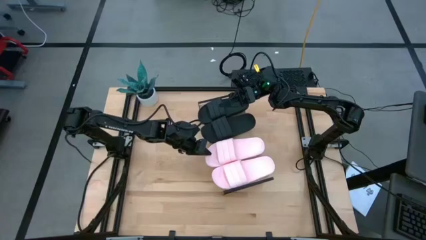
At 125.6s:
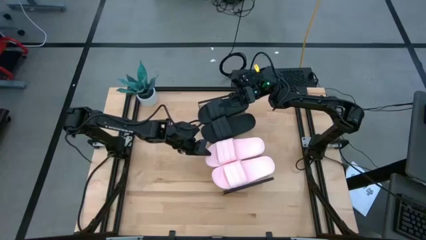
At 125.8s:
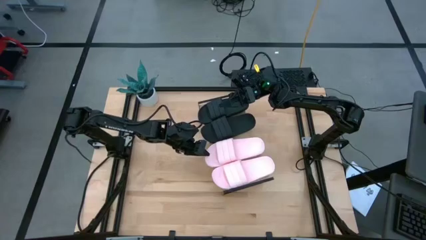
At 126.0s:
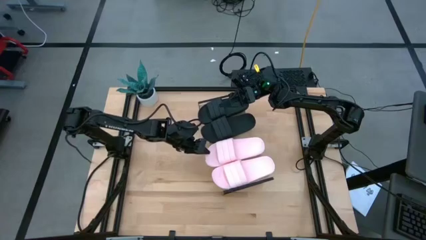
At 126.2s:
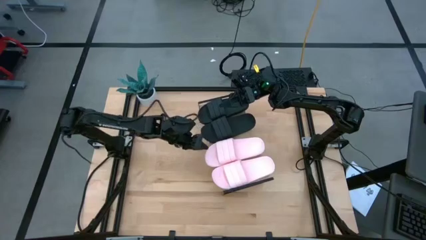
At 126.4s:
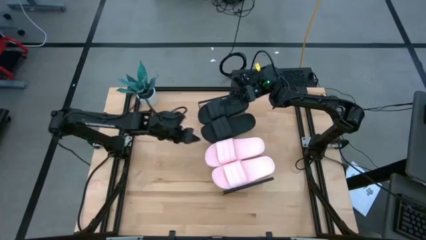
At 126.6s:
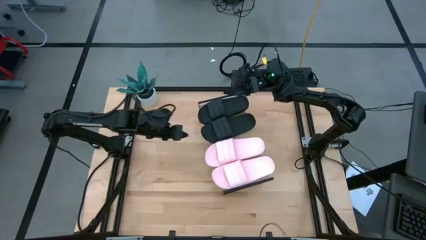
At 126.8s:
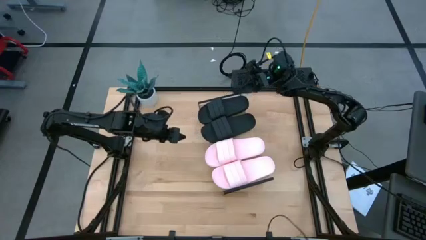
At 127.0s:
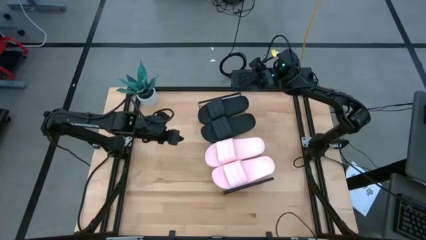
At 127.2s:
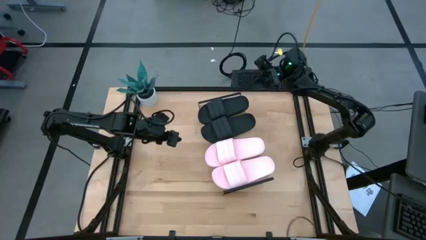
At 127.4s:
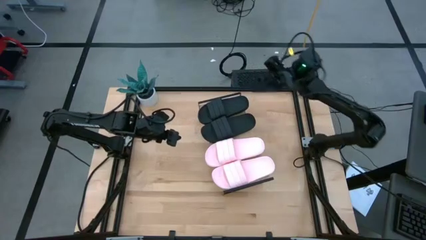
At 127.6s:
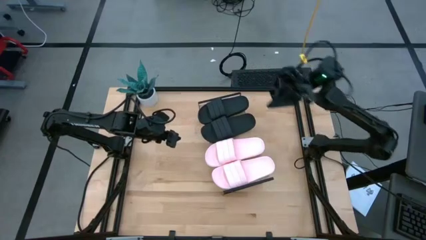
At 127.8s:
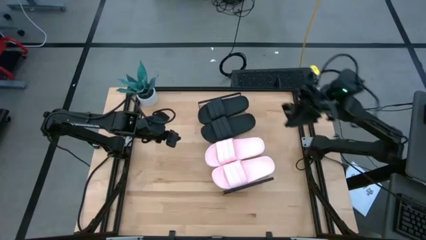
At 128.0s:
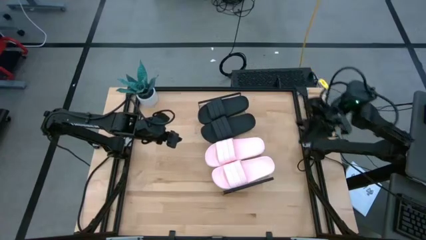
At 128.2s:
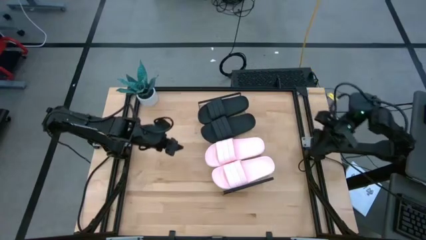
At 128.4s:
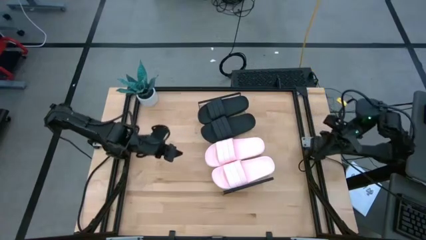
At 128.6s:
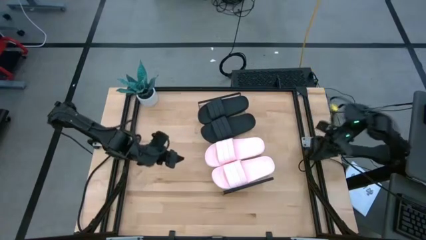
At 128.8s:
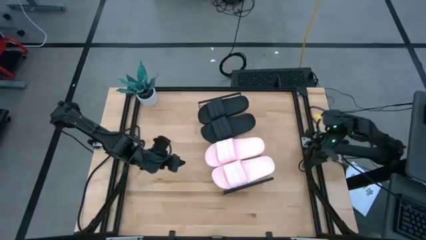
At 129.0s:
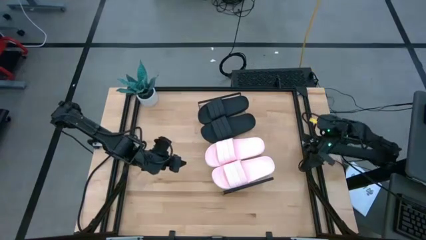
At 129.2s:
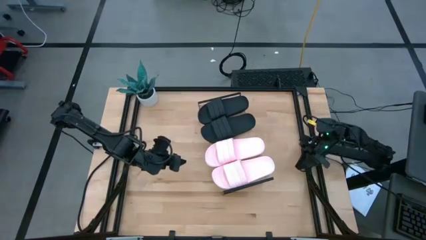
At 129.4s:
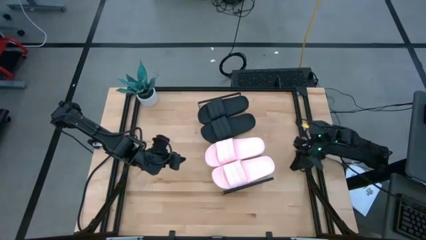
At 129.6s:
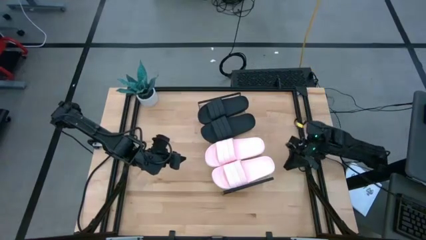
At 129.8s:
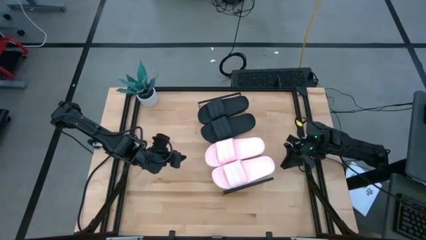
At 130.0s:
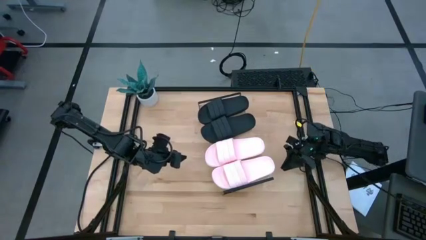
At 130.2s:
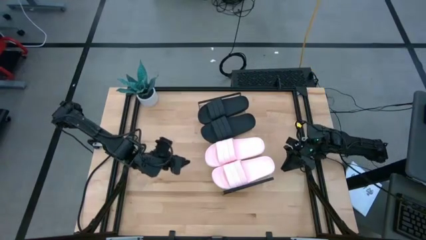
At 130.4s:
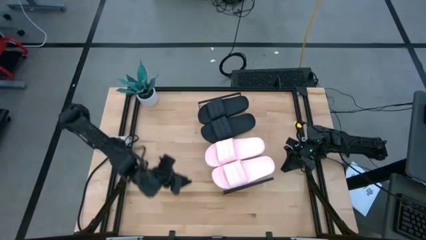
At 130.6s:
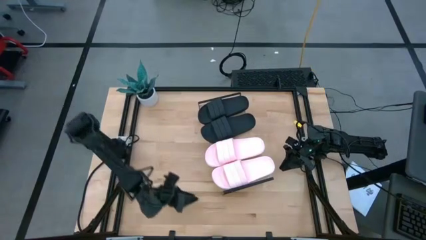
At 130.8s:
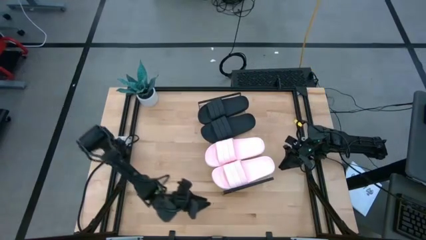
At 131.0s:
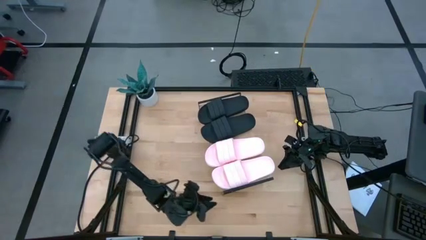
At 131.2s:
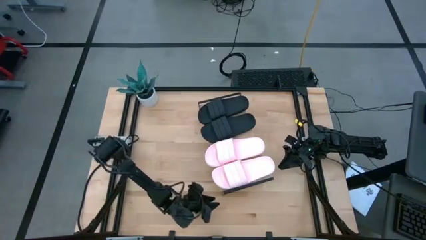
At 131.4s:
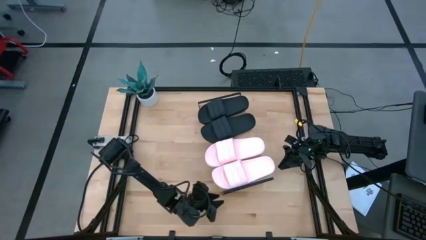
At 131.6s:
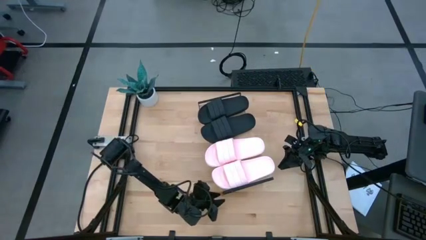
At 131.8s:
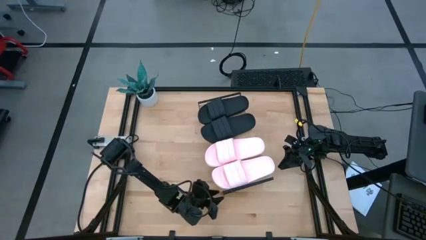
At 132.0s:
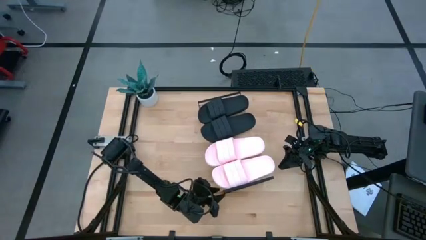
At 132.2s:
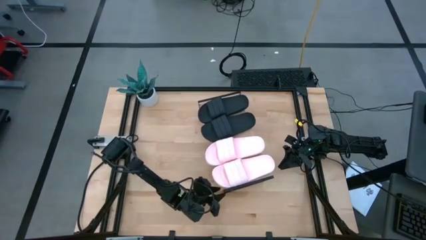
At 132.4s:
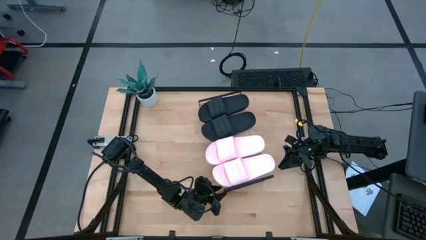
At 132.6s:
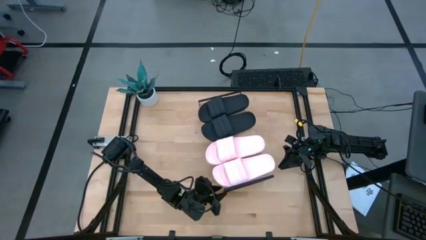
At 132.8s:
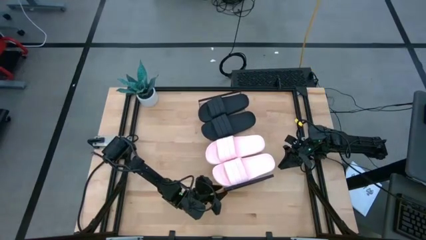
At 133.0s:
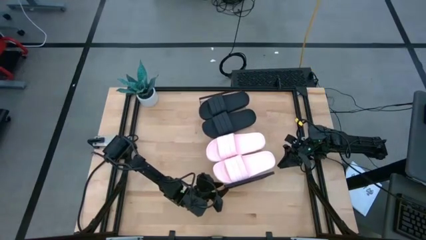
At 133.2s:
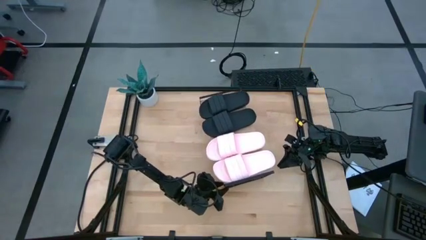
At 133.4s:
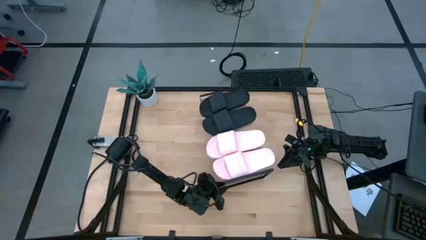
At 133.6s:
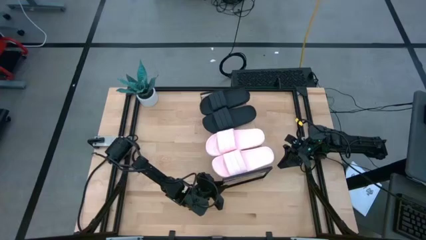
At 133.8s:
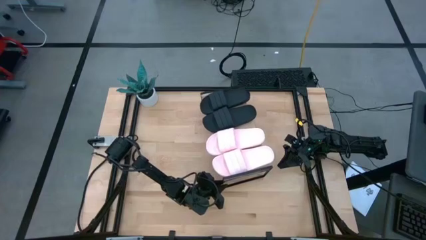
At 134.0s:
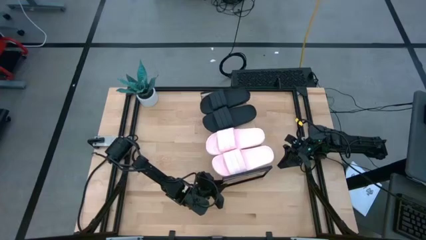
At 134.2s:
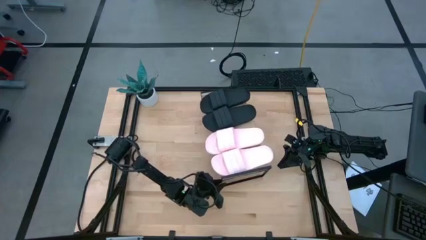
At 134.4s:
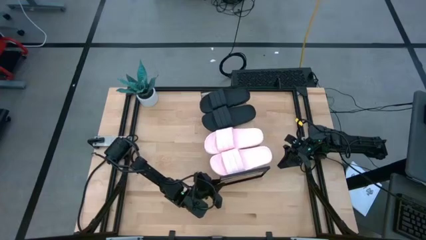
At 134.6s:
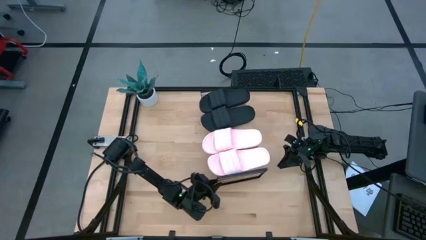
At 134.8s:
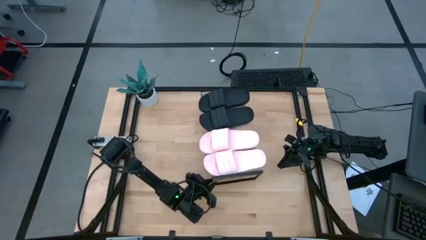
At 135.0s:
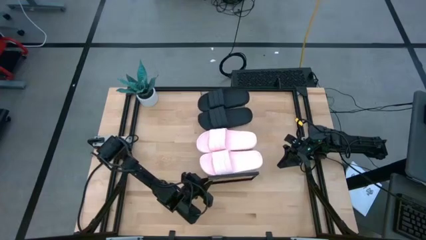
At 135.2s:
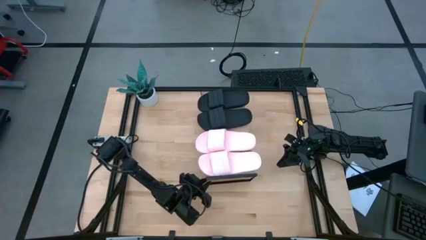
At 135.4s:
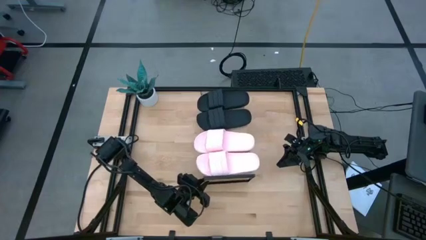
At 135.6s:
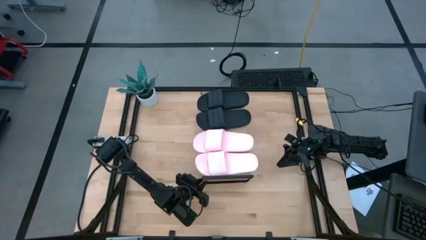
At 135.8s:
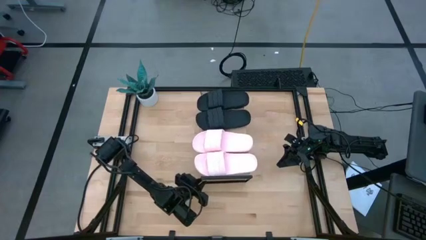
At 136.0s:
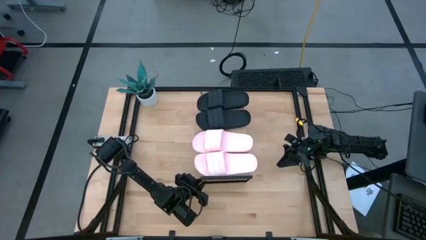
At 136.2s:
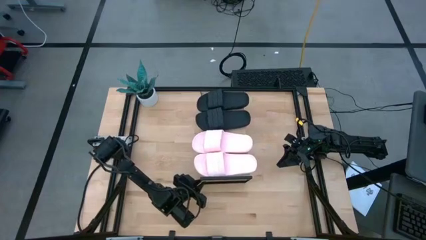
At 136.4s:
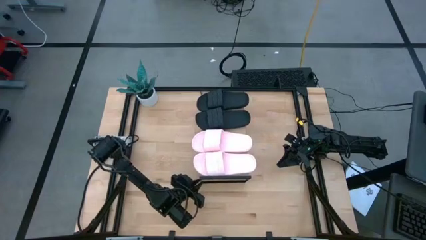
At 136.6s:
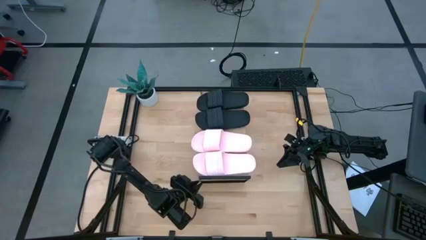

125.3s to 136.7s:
Task: Pick and place slides into the shelf
Adjust the shelf

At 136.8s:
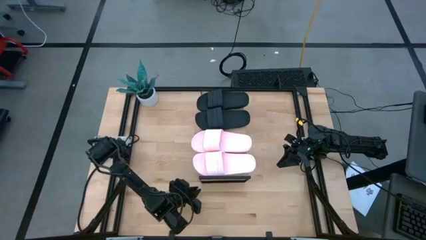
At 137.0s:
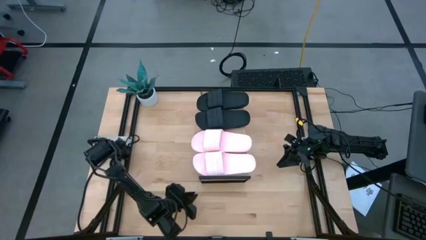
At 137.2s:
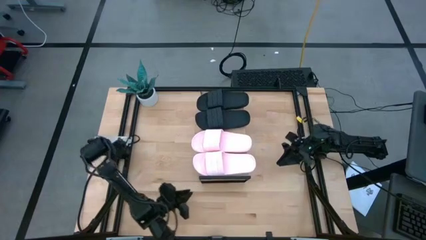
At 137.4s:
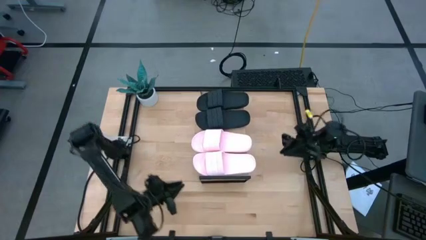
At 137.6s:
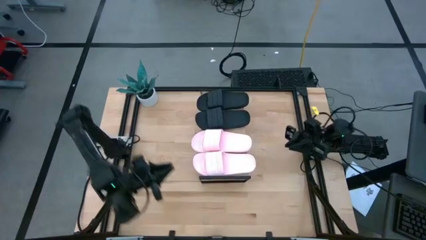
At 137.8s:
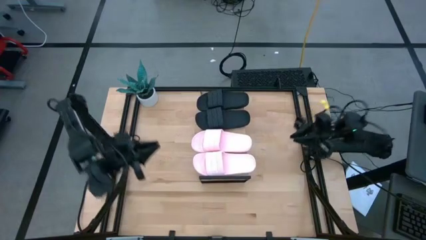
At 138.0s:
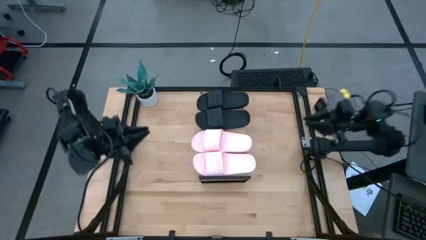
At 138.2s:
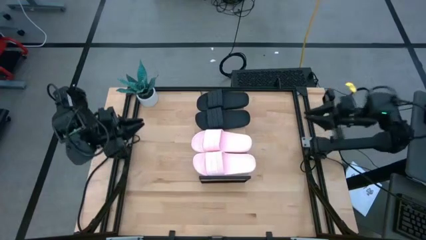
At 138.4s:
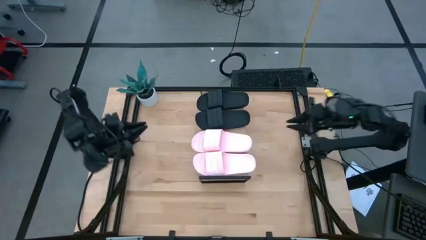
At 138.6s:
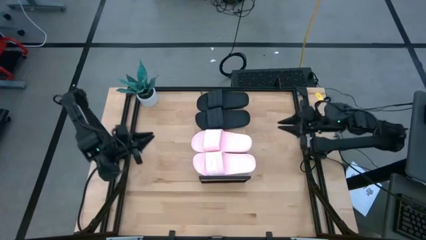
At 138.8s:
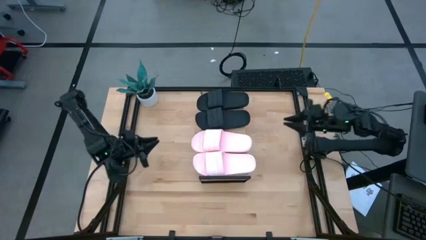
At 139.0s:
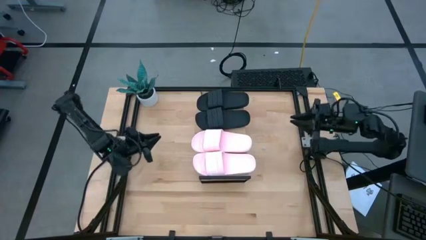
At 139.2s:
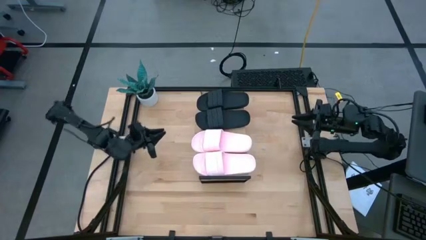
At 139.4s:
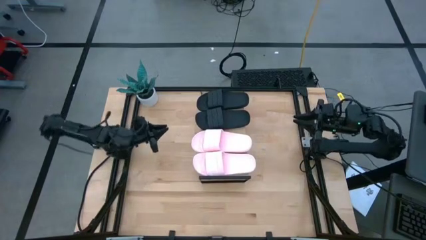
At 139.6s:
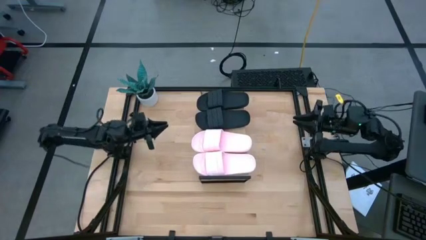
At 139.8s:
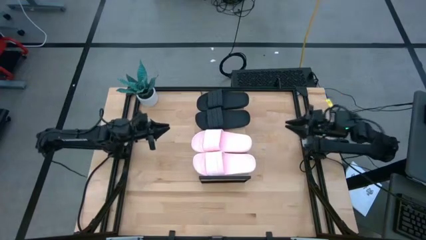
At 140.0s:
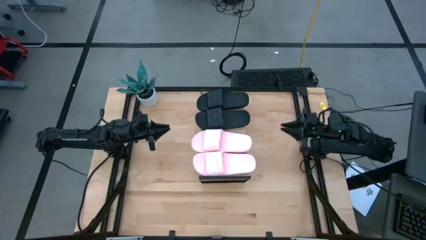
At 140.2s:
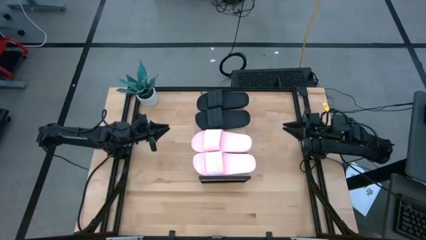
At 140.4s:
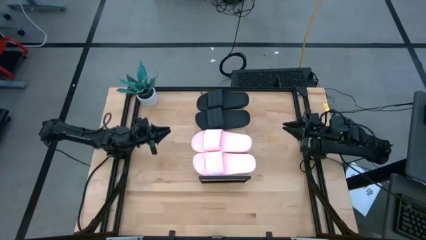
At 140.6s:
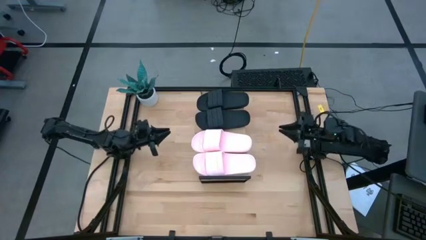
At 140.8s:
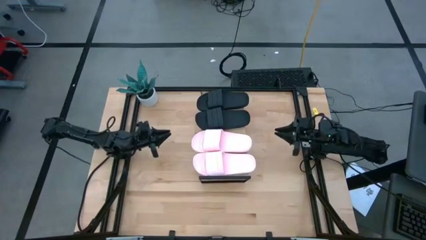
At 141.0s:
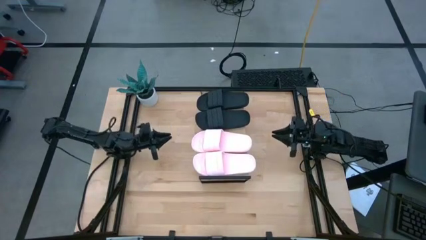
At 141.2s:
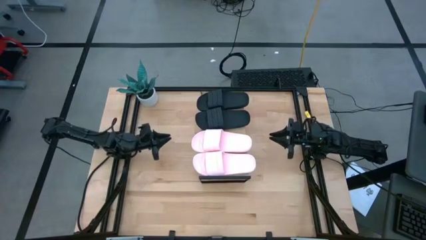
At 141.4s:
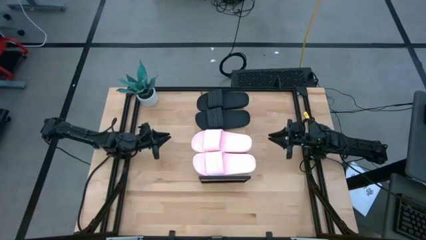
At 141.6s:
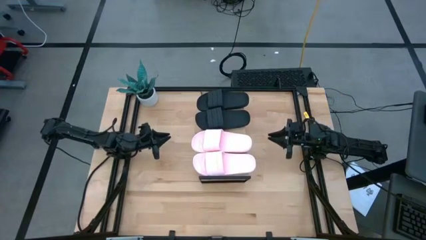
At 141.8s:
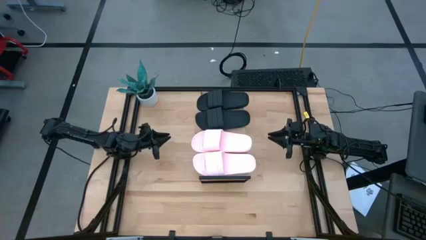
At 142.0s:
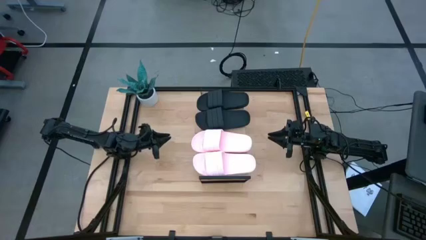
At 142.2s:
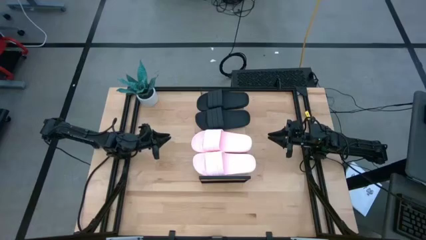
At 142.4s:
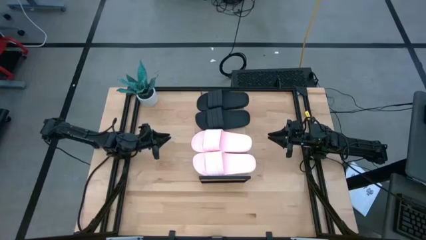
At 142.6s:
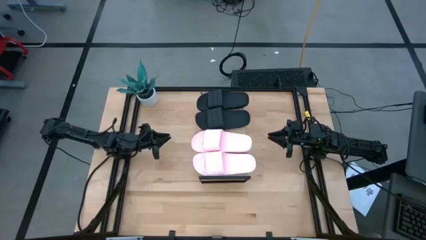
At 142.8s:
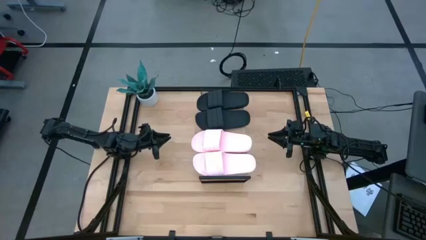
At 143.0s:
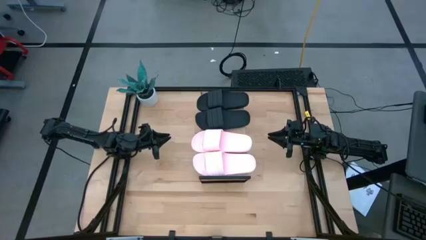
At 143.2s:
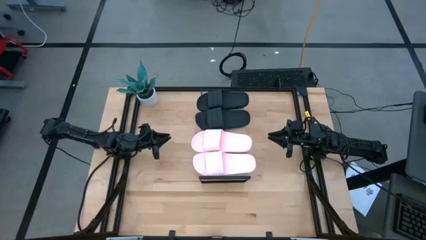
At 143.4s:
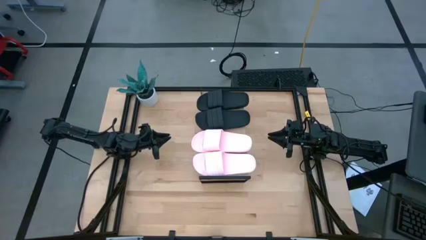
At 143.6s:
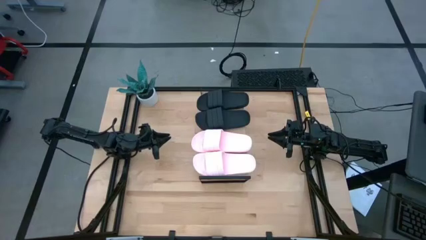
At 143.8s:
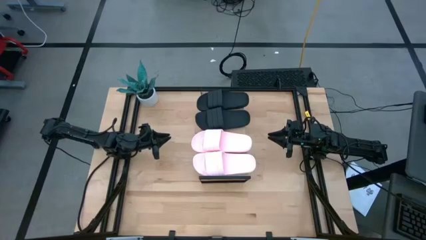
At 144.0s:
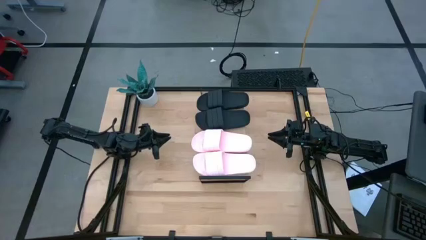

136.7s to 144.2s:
Return to Home Position
